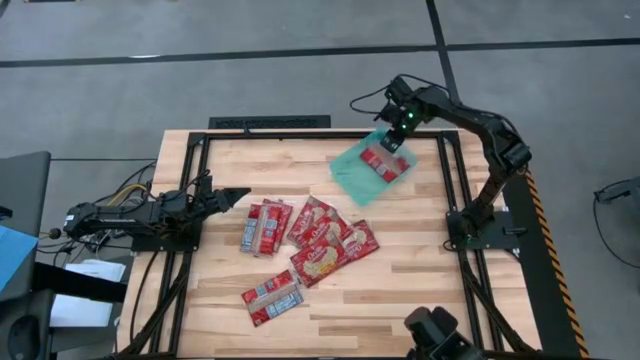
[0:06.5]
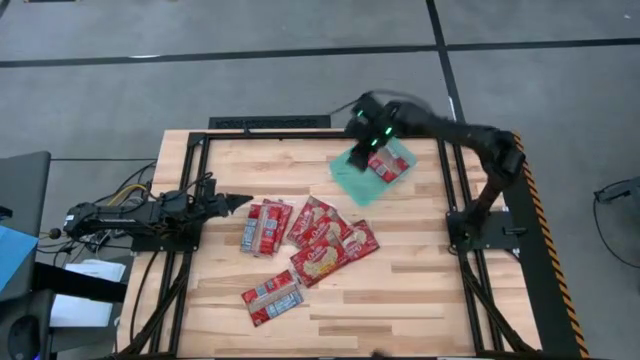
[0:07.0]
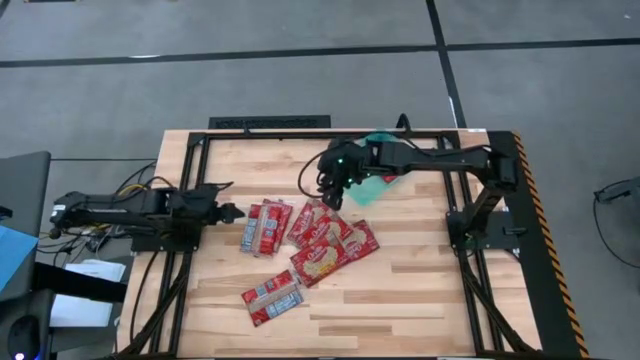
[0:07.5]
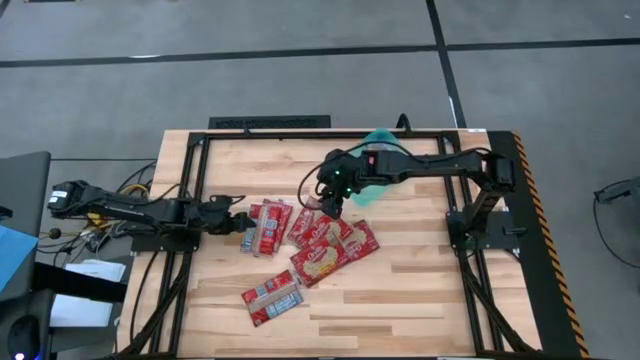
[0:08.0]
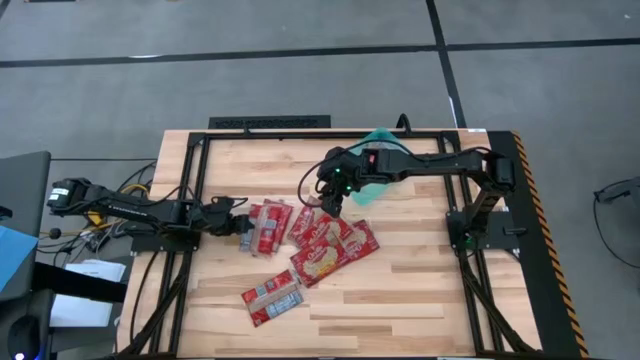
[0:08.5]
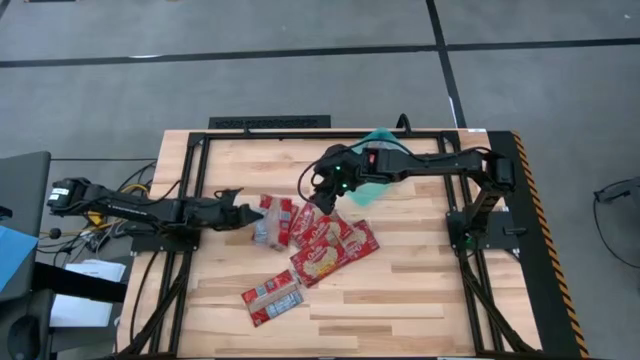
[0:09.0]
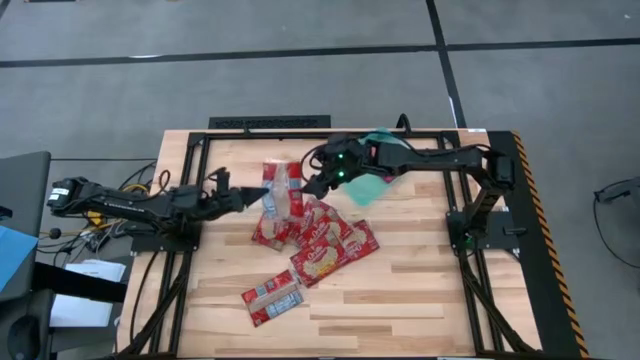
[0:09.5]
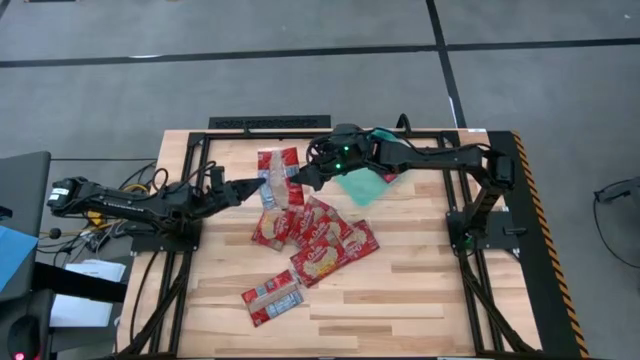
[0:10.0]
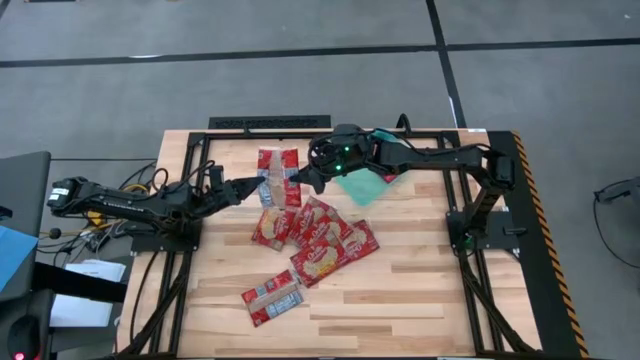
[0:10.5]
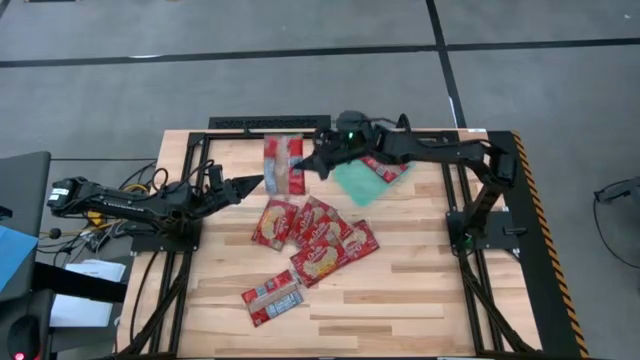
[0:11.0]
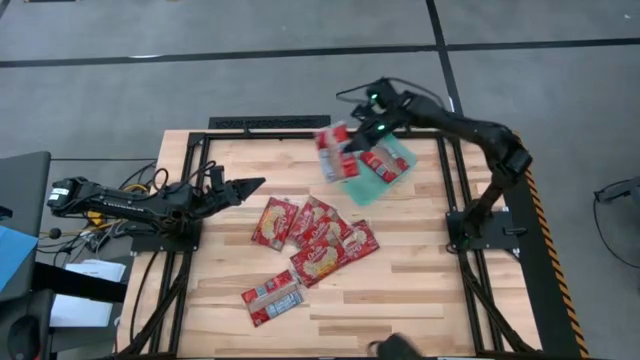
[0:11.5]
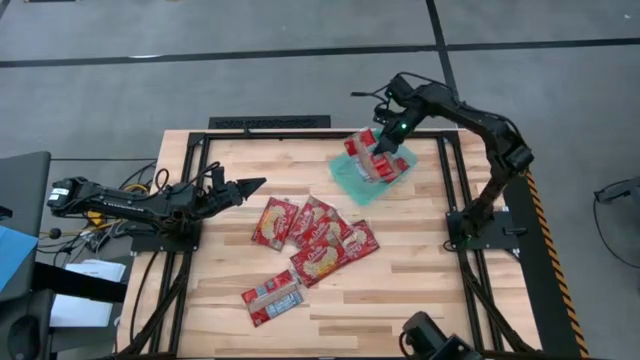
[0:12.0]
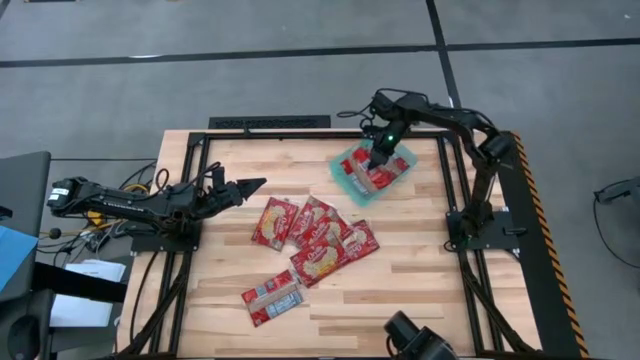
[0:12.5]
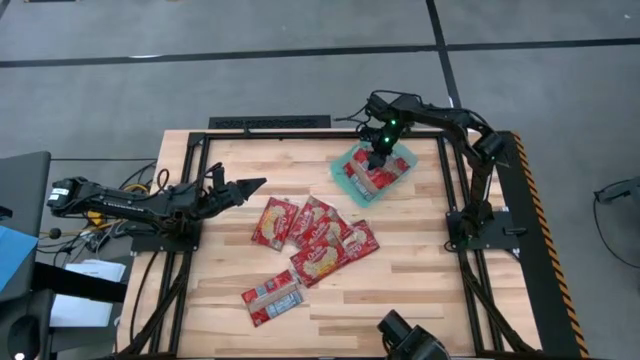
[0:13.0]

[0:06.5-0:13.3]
Task: Sort popcorn bags into baskets
Put the red popcorn bag into the green bin

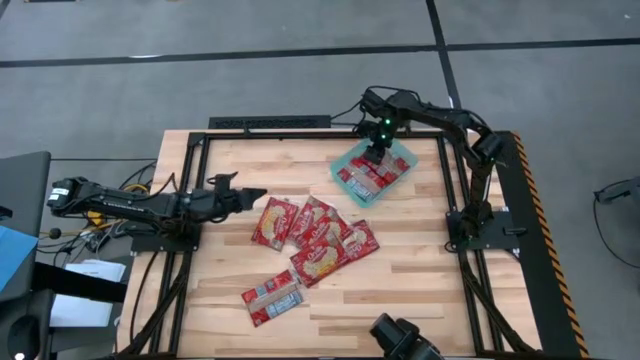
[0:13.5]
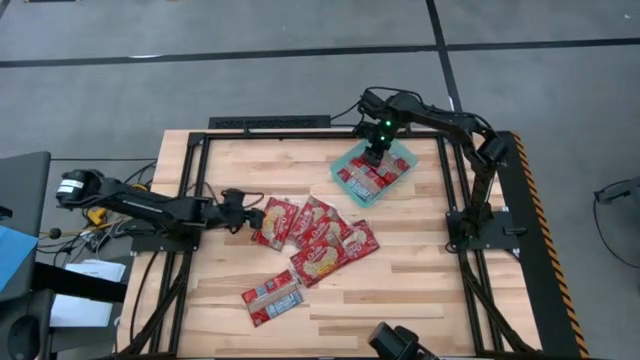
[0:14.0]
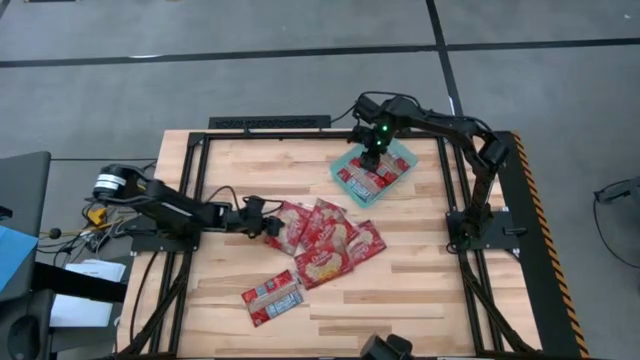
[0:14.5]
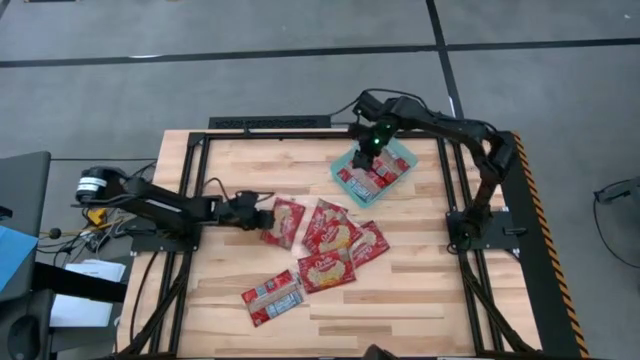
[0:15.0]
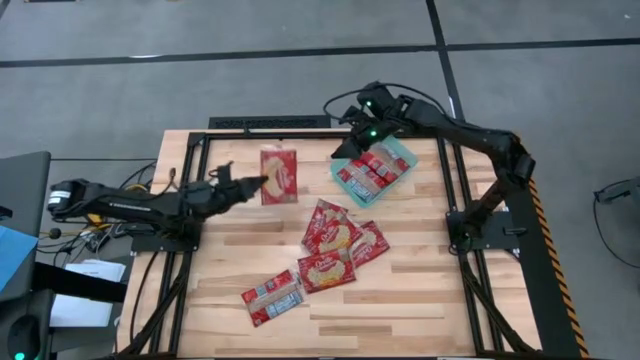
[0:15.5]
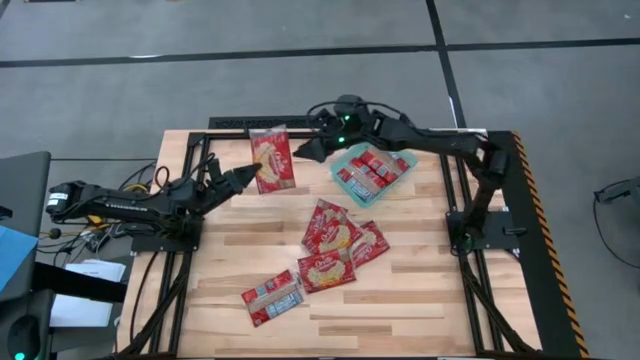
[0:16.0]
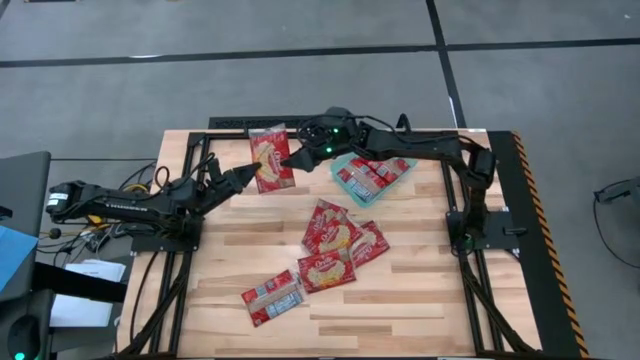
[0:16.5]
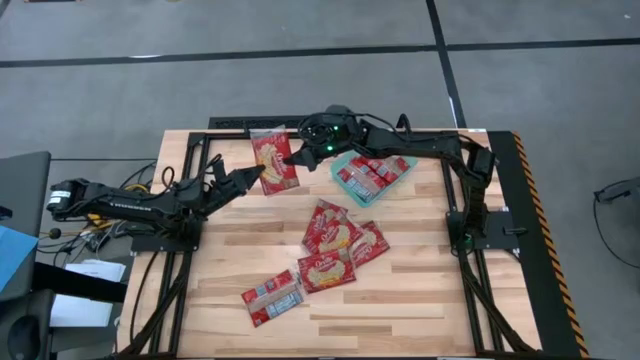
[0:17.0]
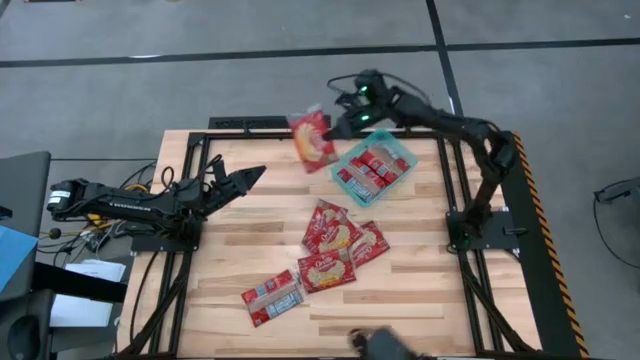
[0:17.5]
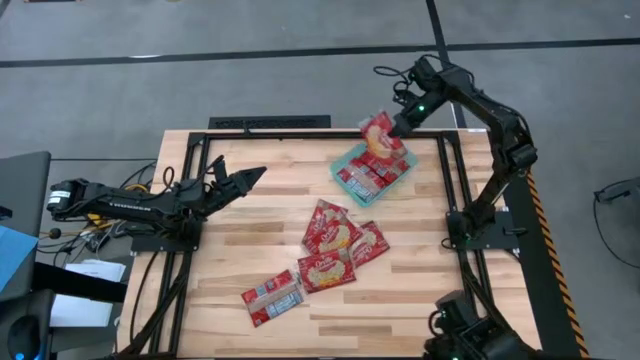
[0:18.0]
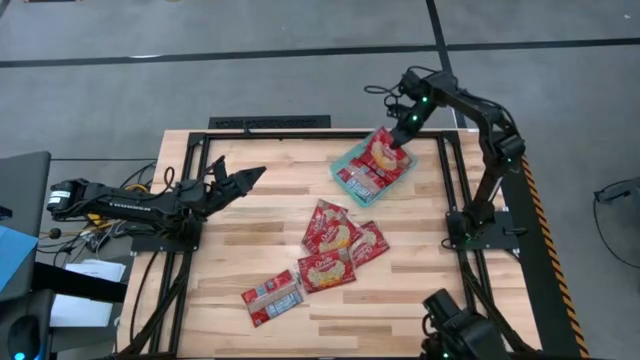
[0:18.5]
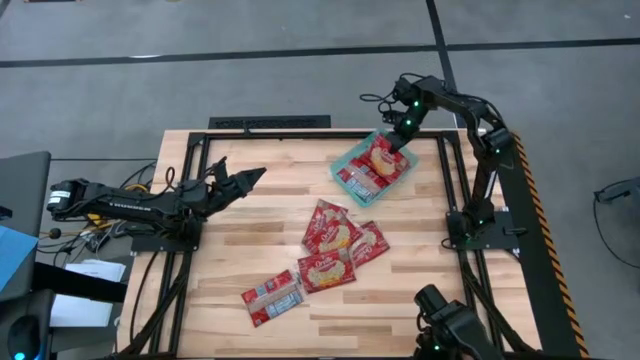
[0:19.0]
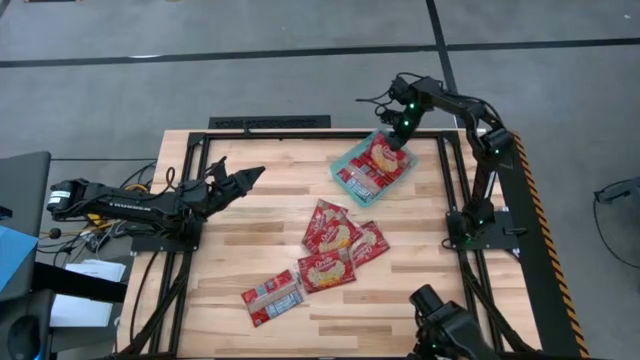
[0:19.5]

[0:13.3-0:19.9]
Put the red popcorn bag into the green bin

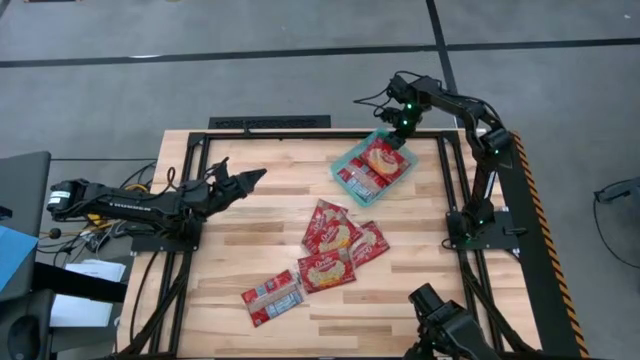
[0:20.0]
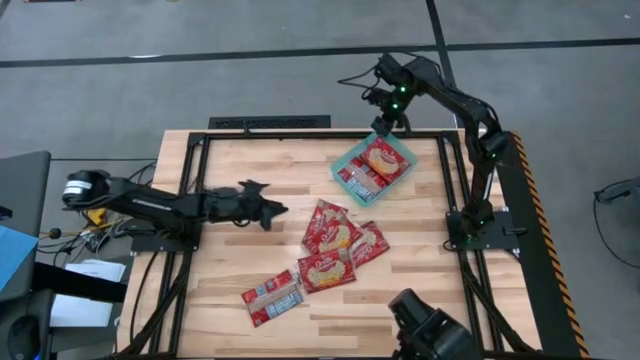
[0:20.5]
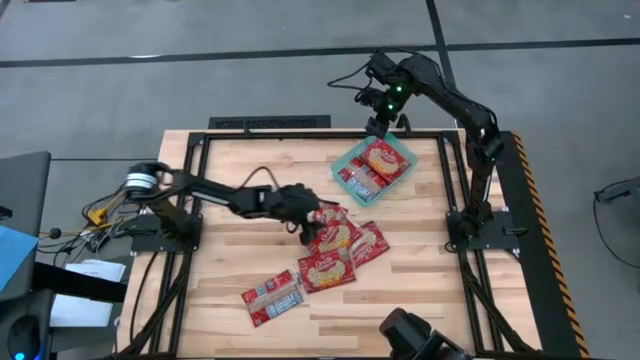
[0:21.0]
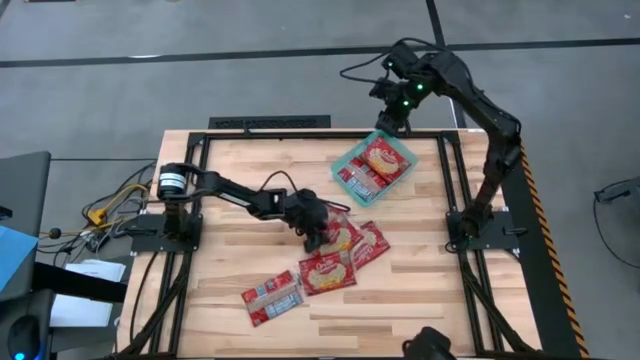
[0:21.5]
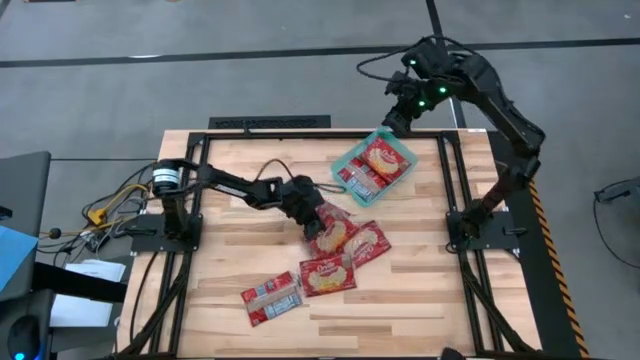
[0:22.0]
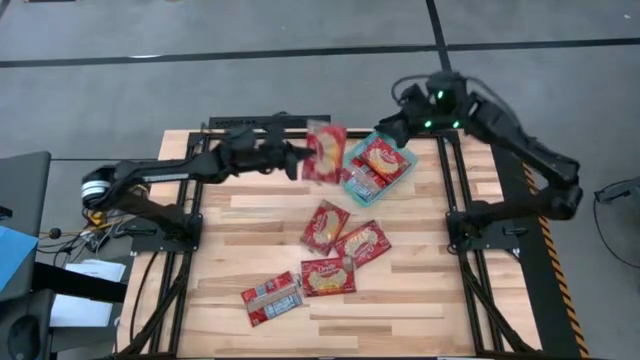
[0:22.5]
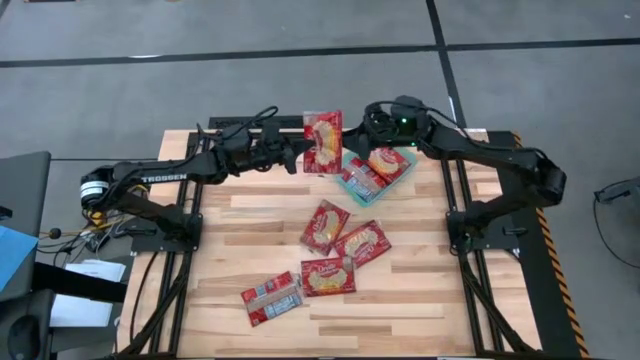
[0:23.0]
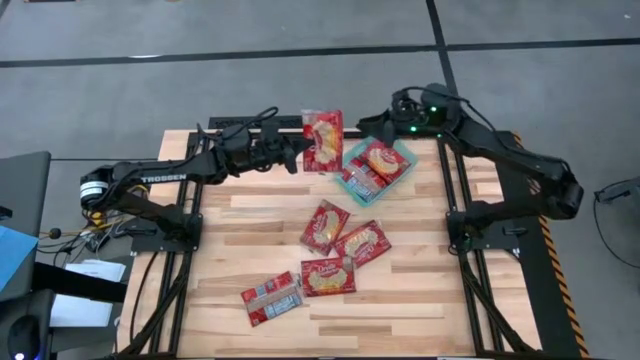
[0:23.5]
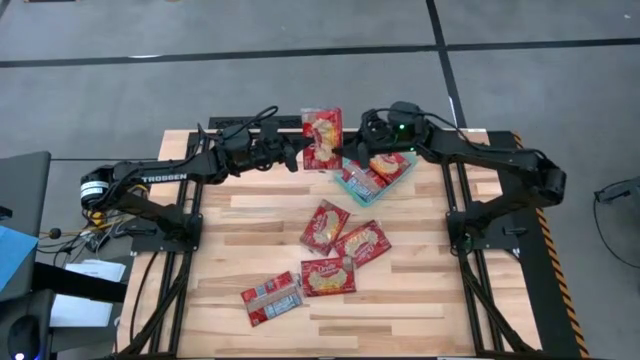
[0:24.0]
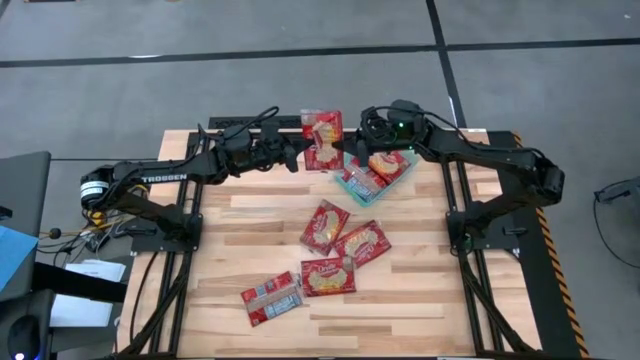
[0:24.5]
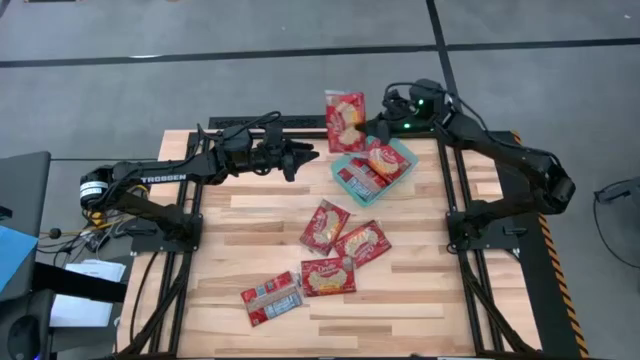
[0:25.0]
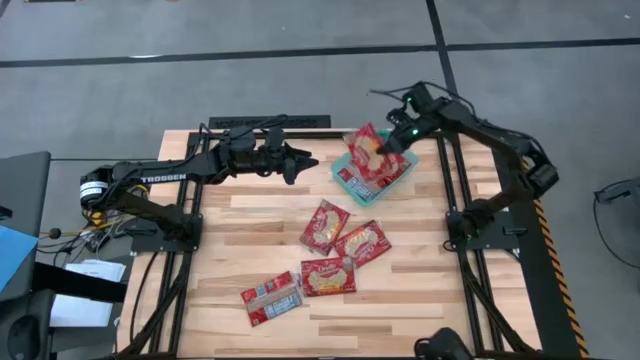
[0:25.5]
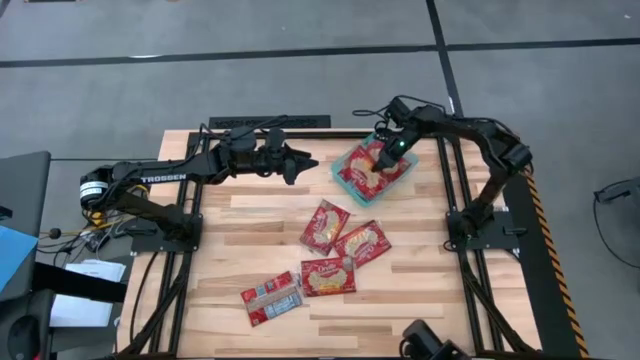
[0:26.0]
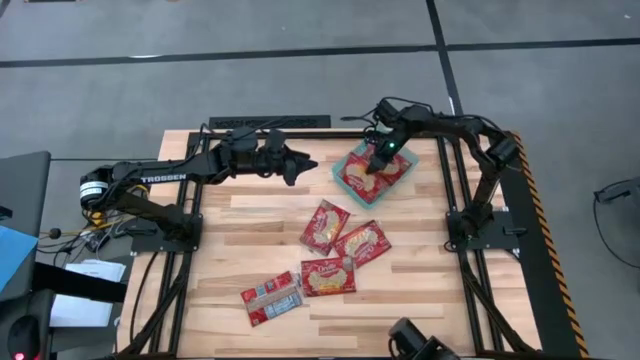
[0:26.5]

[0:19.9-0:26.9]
Put the red popcorn bag into the green bin
